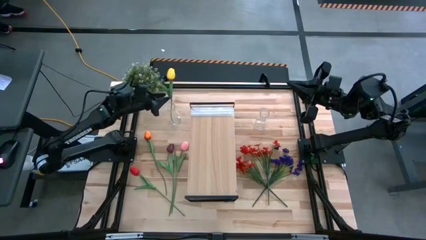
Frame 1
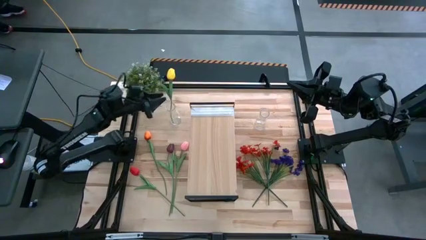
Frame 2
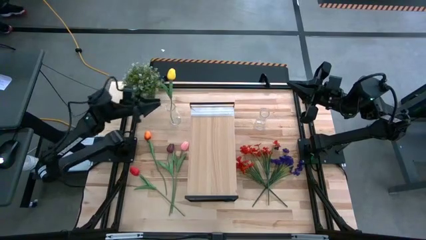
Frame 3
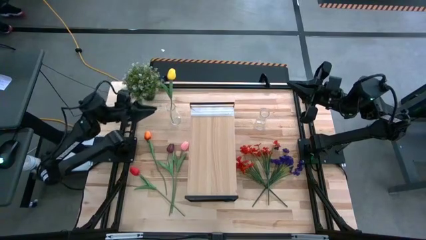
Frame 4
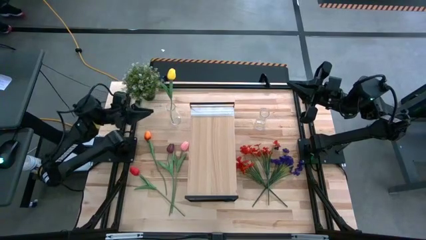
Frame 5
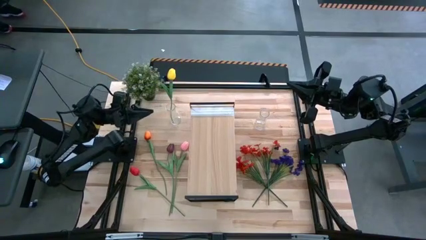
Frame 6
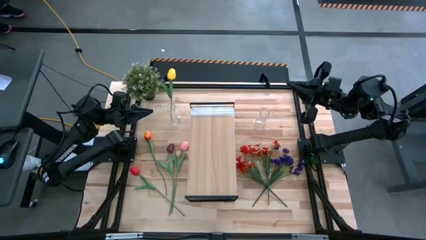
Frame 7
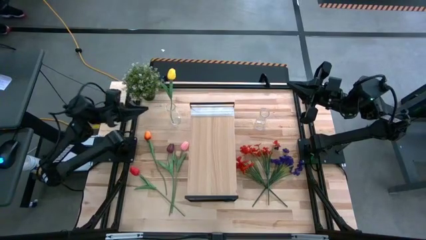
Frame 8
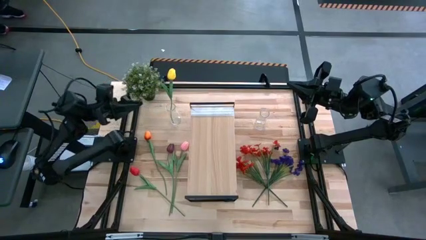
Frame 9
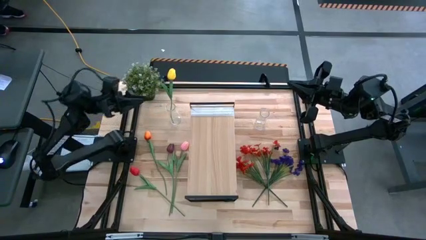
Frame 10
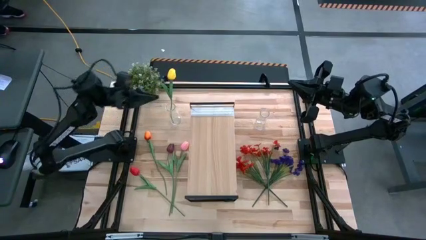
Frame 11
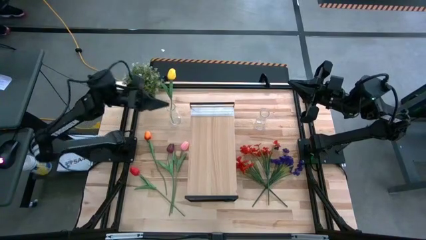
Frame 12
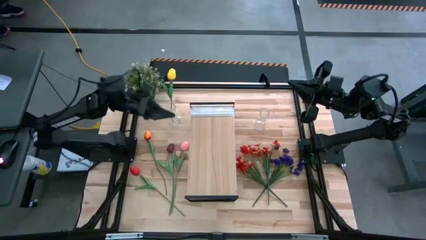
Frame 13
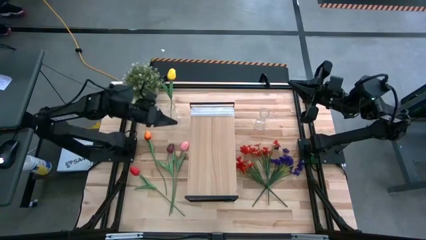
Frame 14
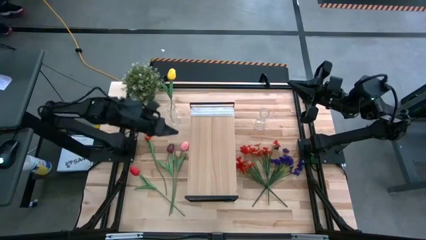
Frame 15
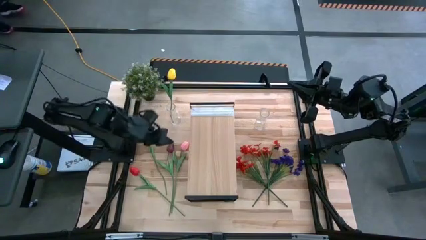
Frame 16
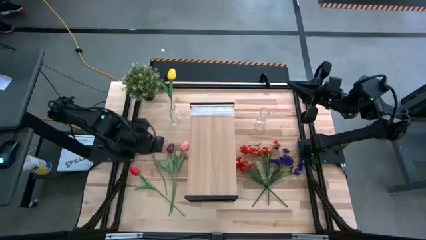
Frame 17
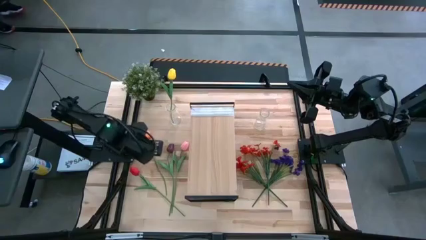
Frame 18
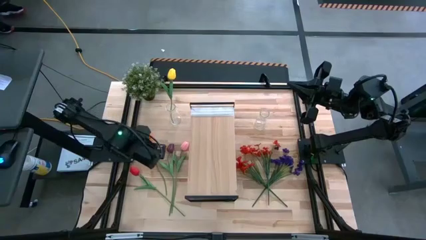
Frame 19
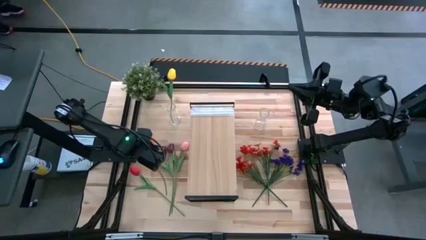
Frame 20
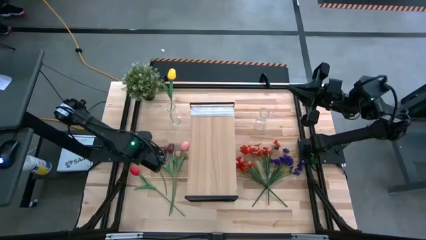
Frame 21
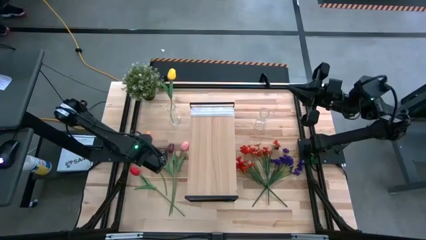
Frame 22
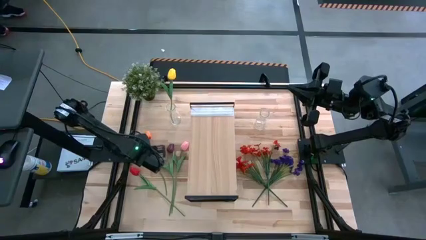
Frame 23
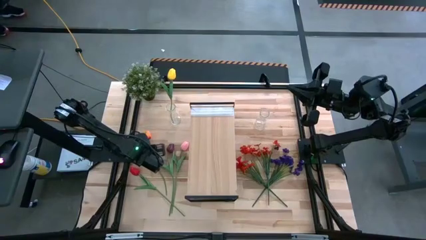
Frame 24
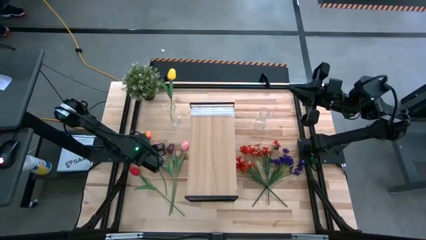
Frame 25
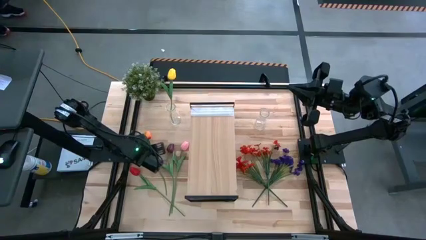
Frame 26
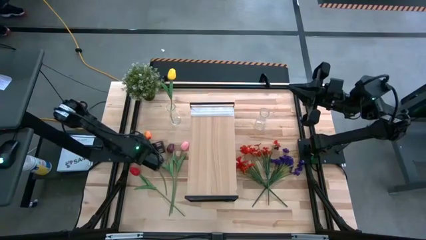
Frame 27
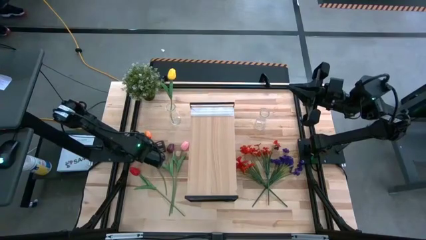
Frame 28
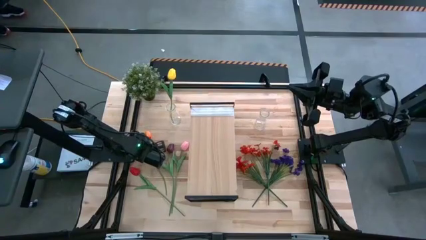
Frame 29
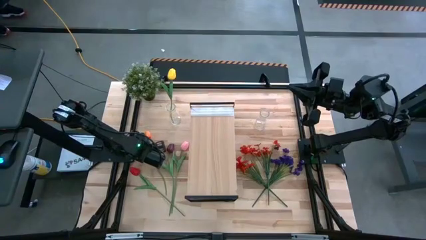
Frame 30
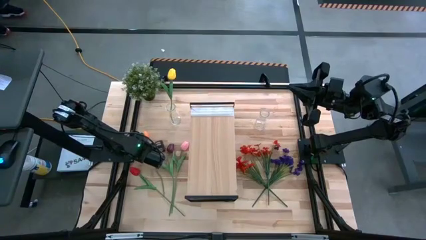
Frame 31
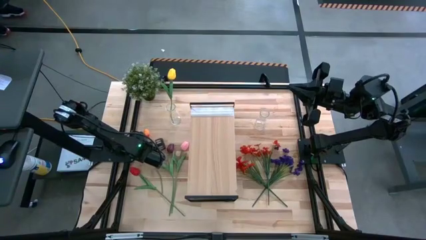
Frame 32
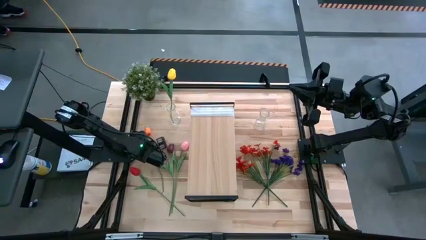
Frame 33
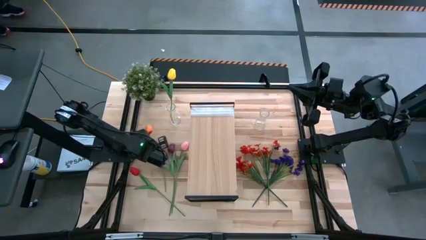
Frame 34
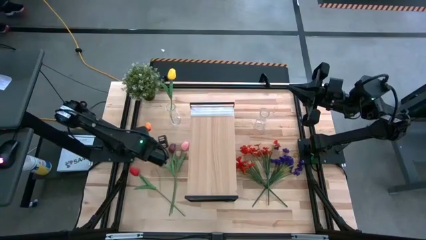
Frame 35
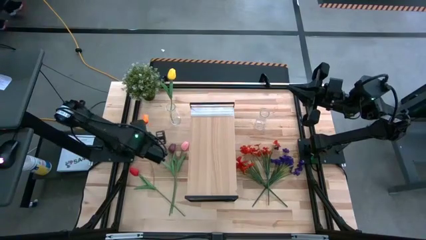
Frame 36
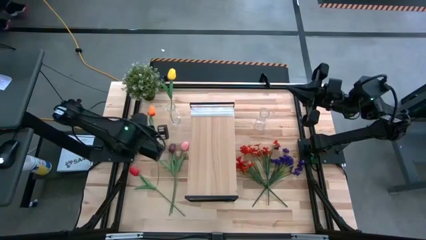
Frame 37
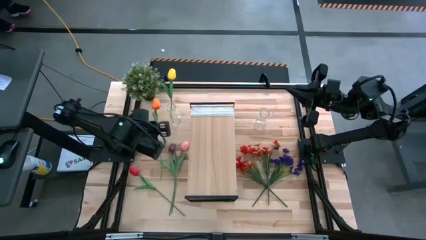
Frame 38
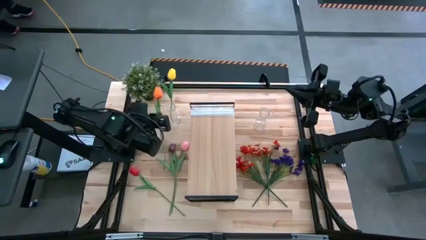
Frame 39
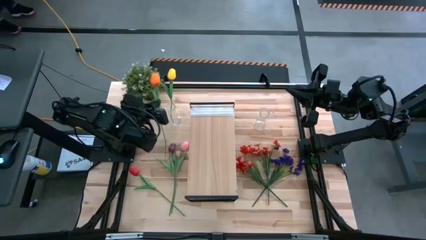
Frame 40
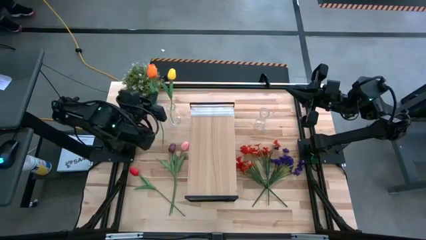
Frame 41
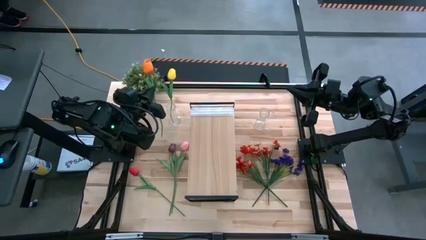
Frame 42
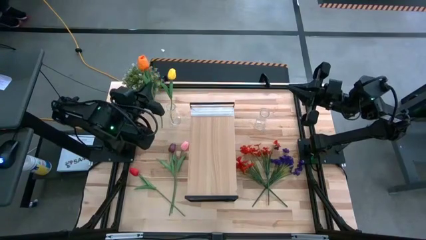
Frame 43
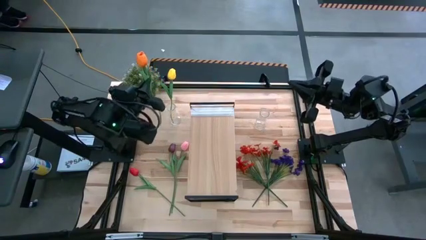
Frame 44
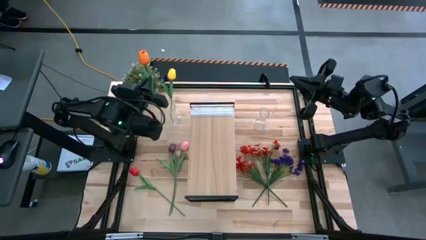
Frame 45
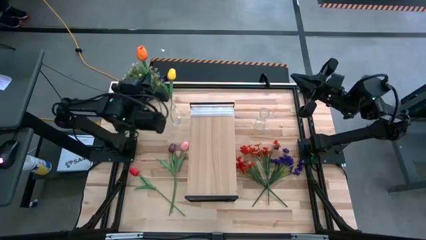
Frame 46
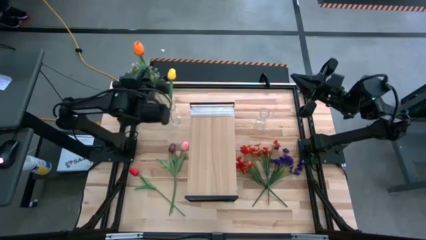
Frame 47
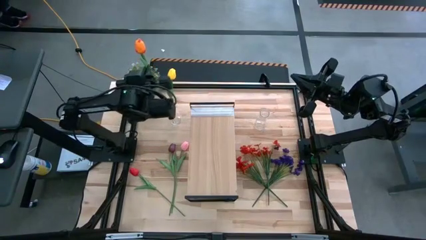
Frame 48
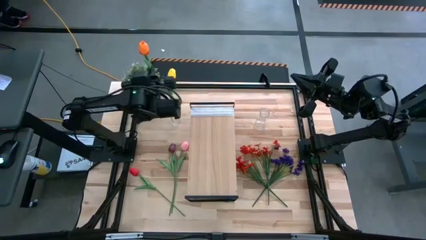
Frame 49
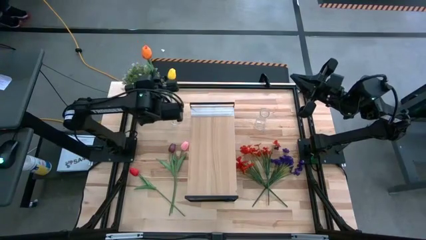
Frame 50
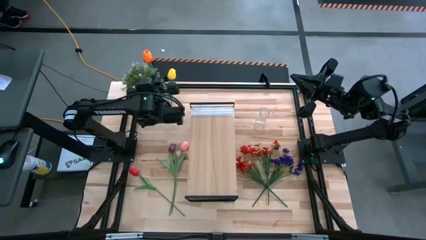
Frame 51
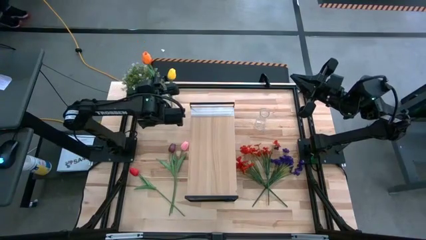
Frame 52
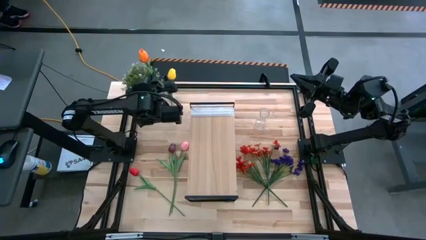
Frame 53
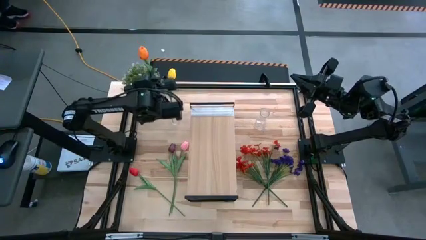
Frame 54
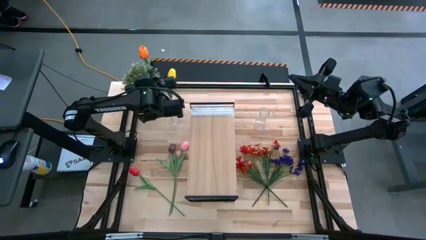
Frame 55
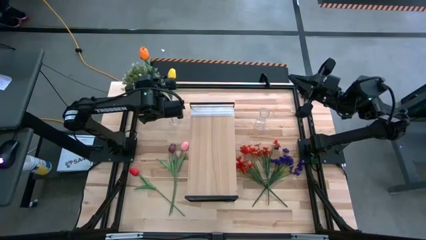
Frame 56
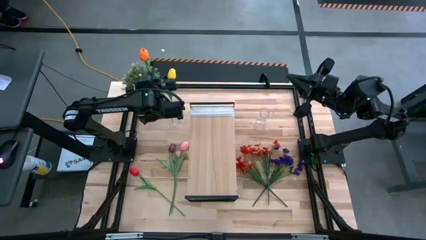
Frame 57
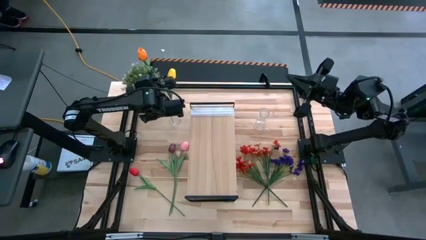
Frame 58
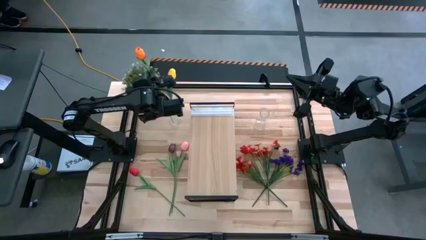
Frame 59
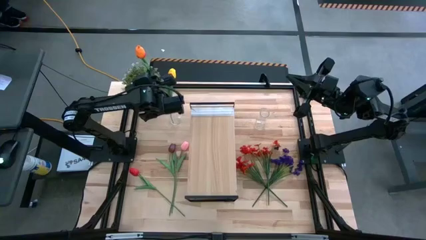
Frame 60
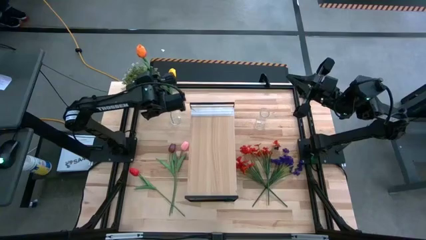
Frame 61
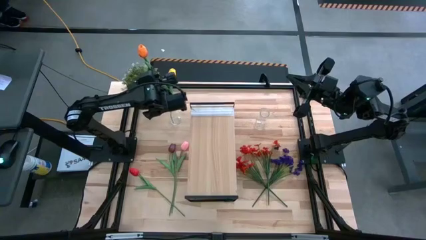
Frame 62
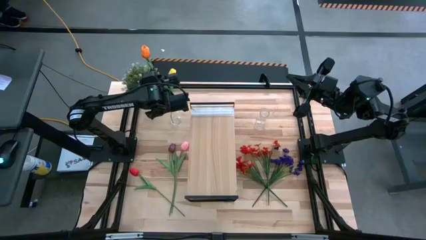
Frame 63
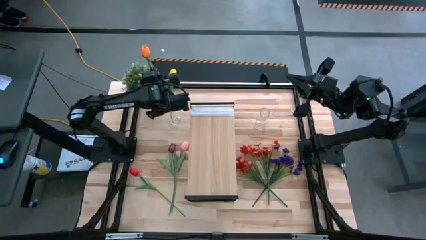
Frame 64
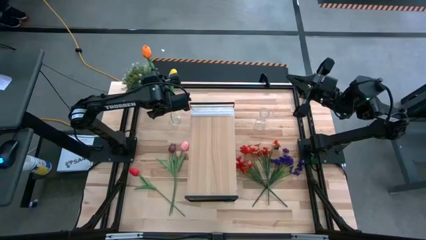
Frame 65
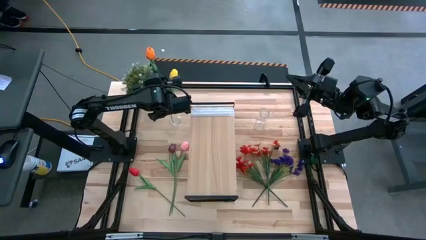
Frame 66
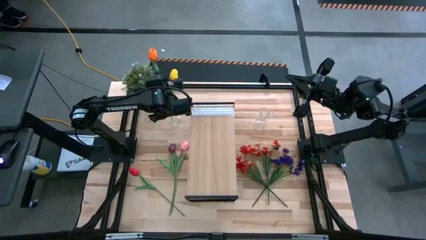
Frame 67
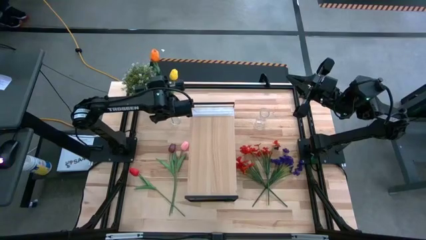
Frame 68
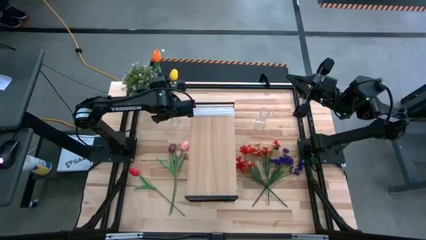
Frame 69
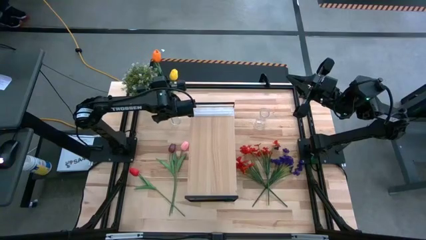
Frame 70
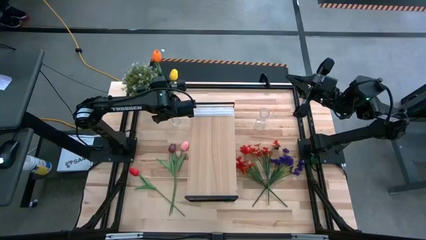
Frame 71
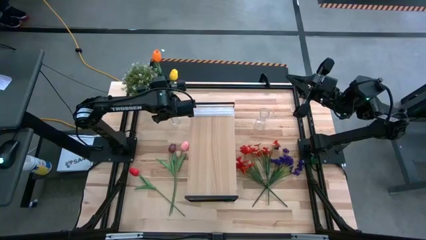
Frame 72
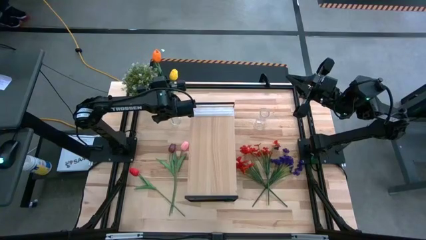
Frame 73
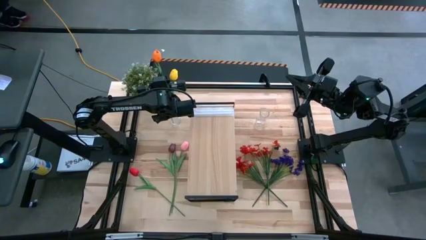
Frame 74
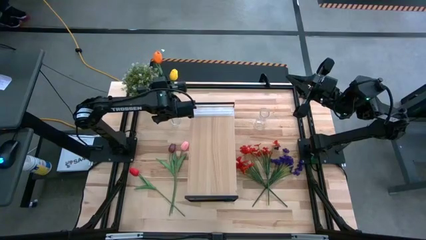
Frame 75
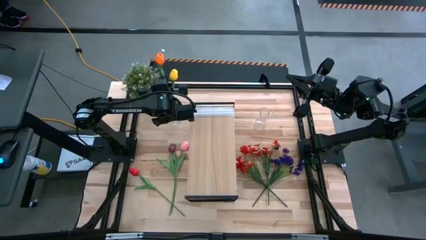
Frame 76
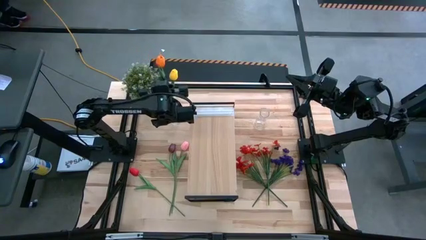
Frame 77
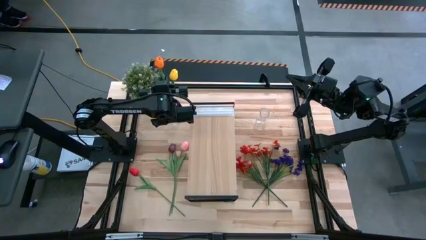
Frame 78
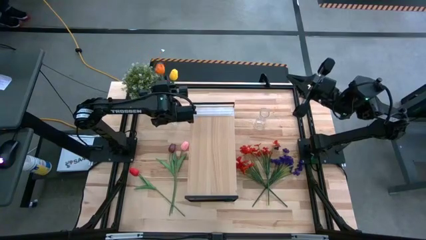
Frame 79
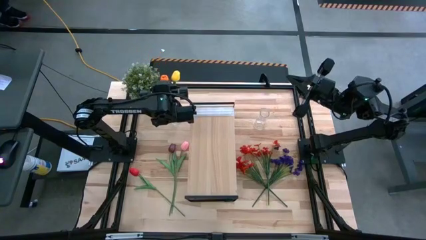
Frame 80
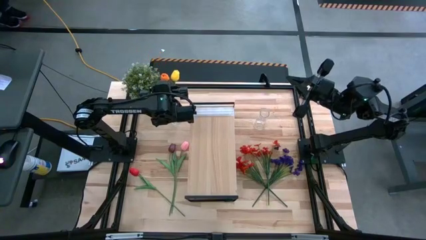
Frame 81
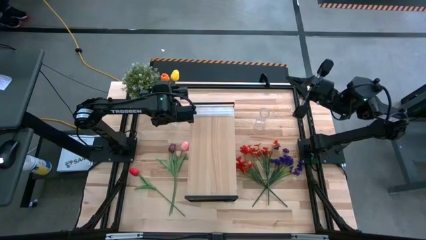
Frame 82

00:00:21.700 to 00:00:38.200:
Task: Pick and place flowers into a vace then onto a shelf
Put the orange tulip into the left transparent vase
